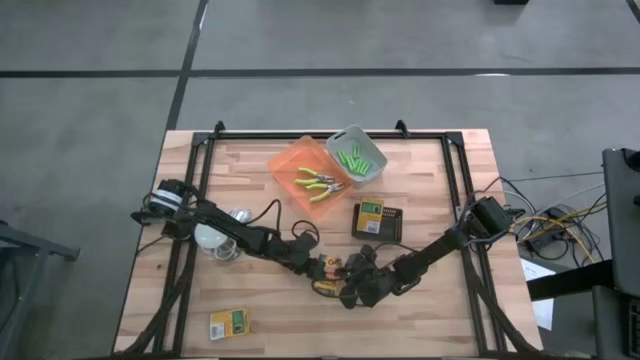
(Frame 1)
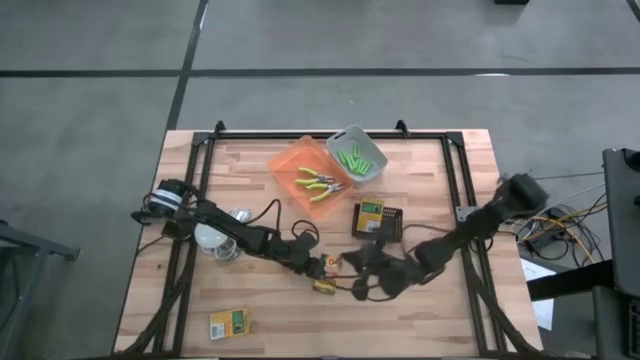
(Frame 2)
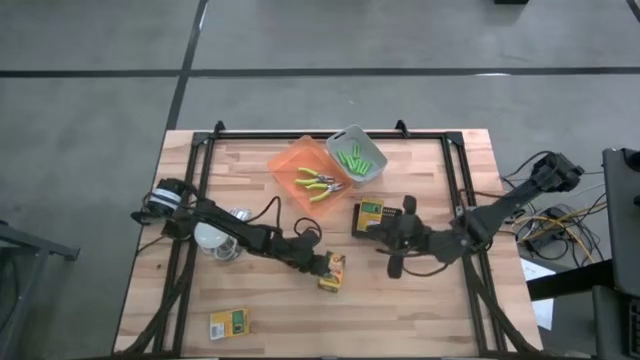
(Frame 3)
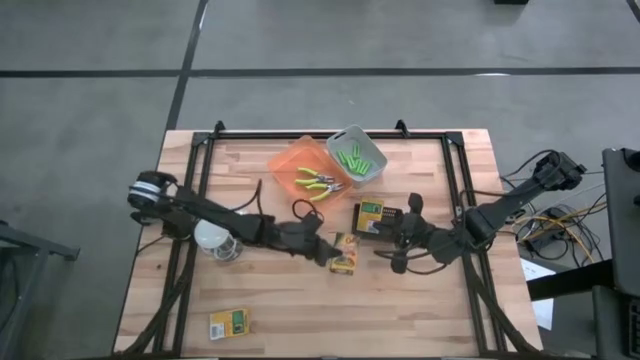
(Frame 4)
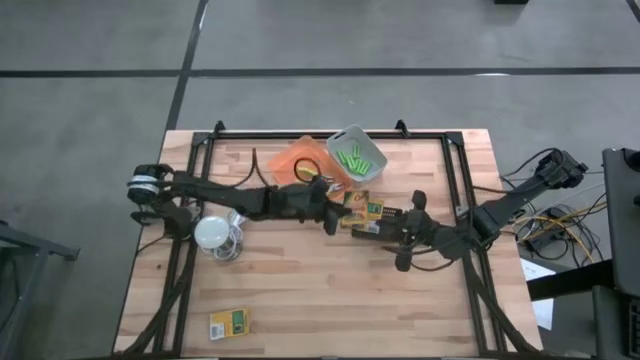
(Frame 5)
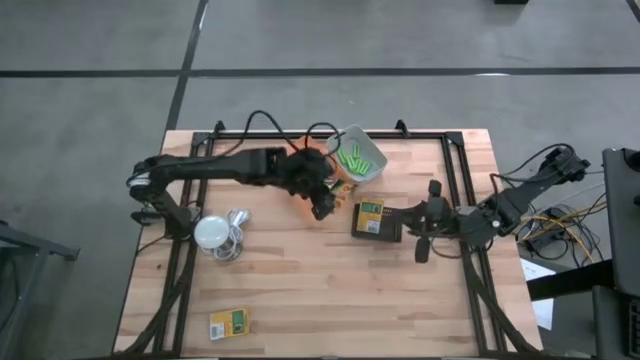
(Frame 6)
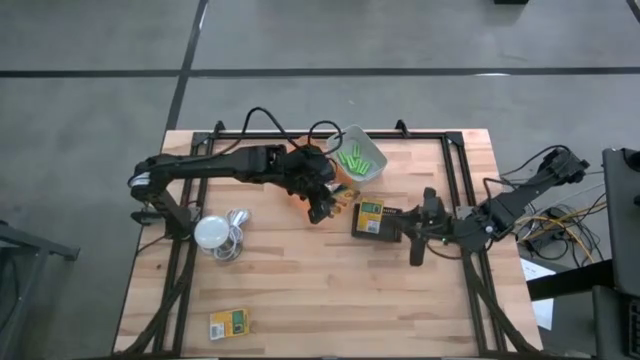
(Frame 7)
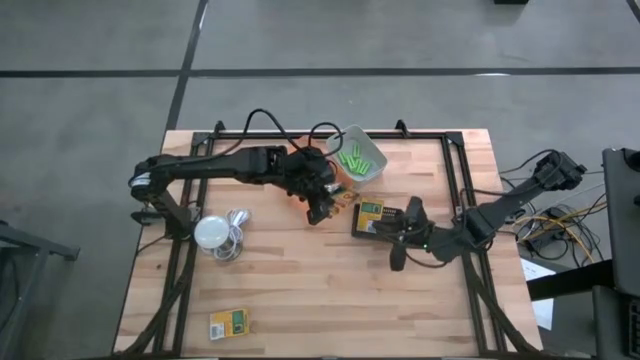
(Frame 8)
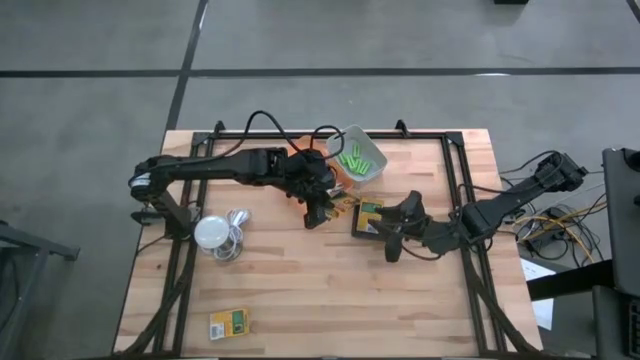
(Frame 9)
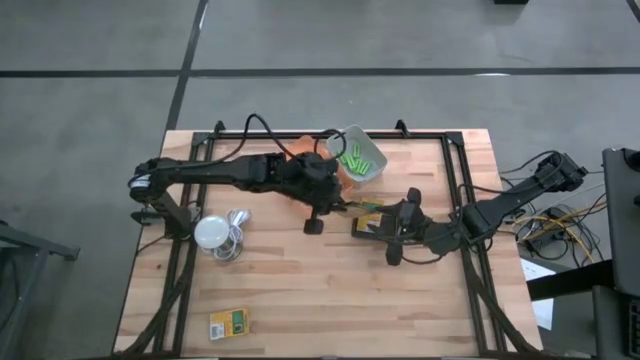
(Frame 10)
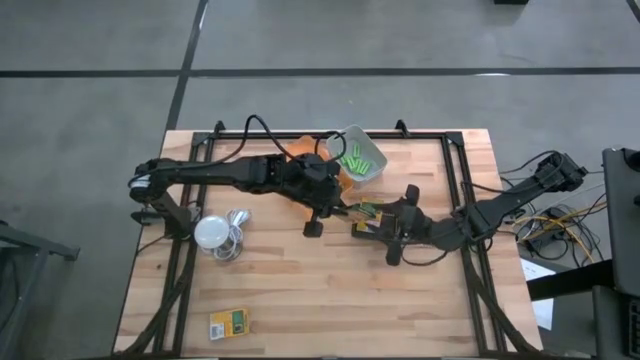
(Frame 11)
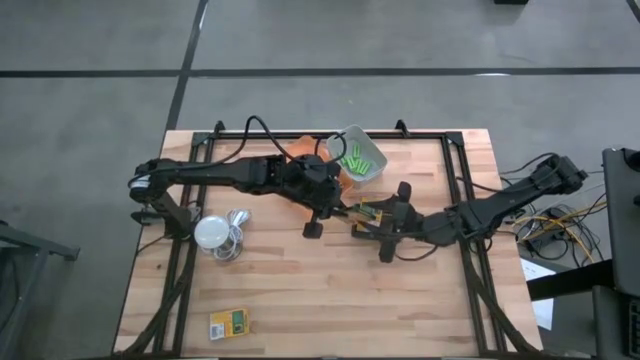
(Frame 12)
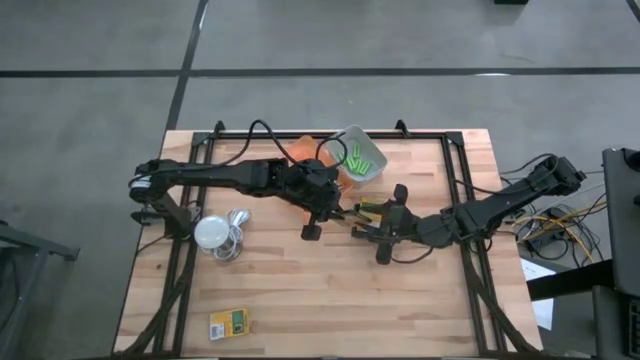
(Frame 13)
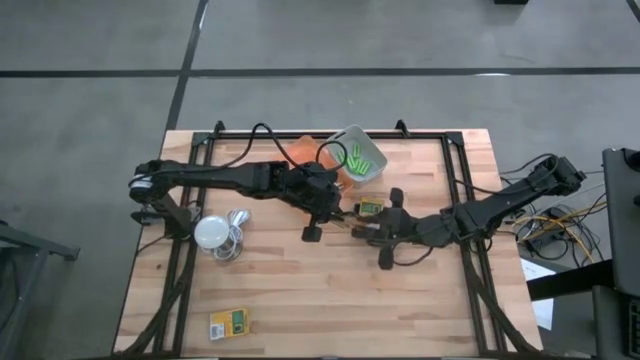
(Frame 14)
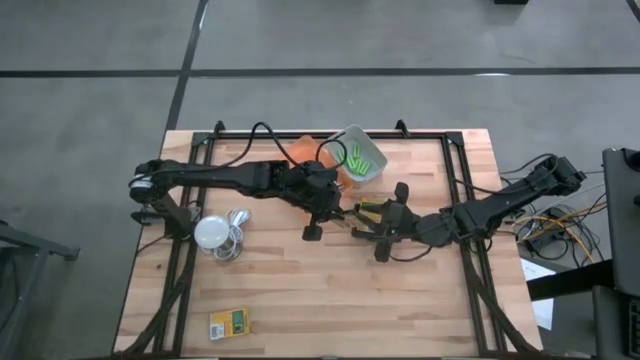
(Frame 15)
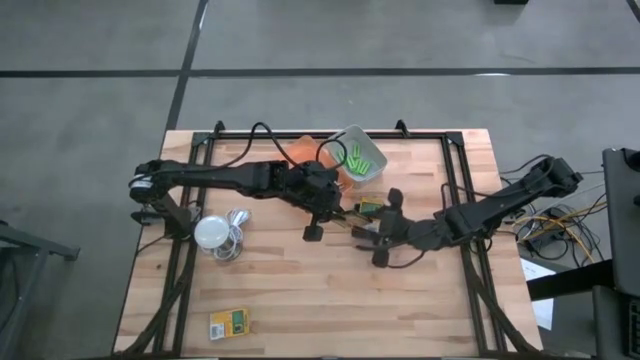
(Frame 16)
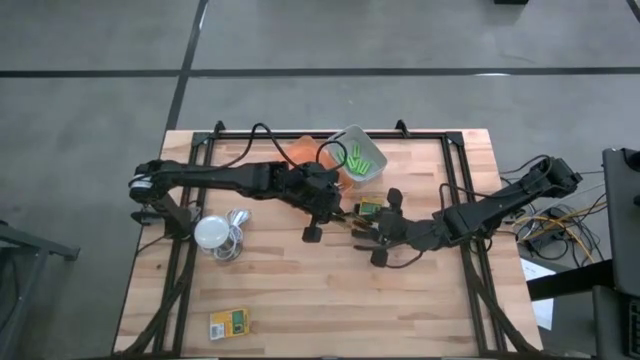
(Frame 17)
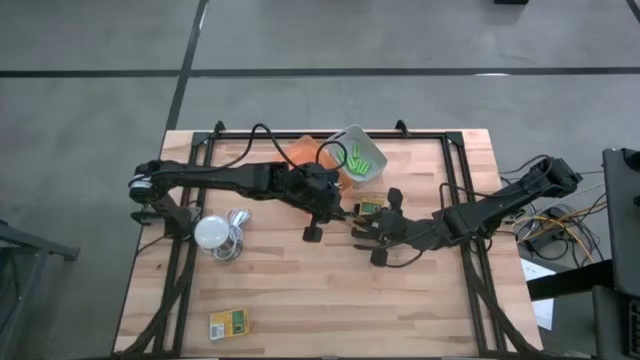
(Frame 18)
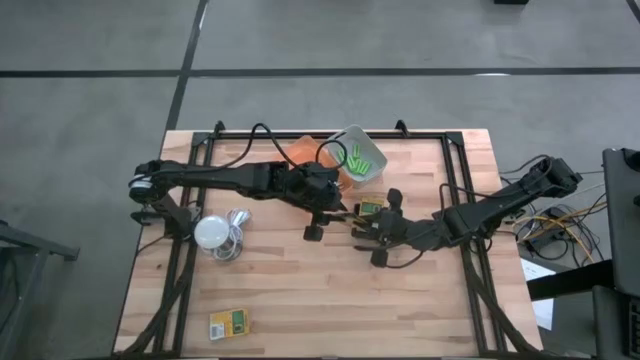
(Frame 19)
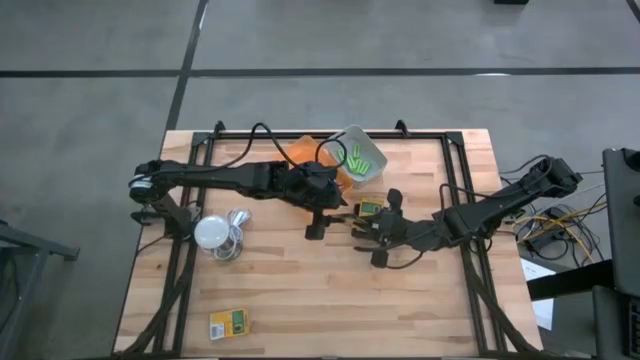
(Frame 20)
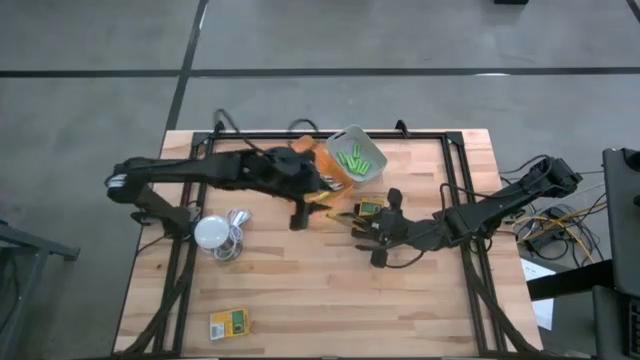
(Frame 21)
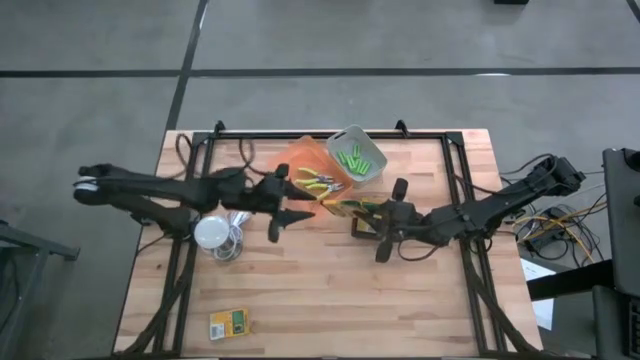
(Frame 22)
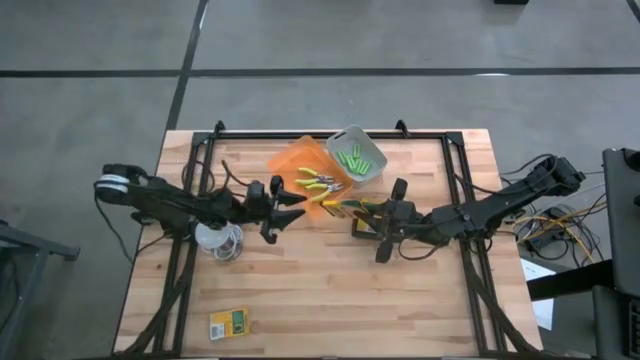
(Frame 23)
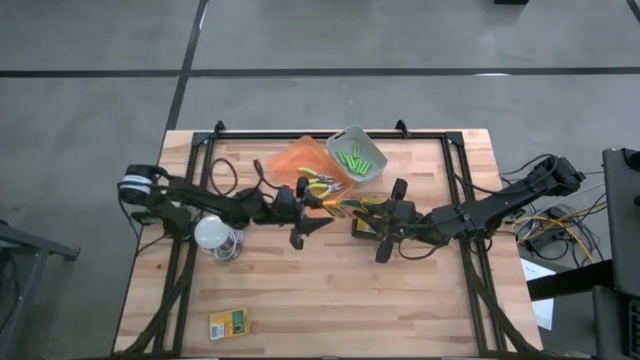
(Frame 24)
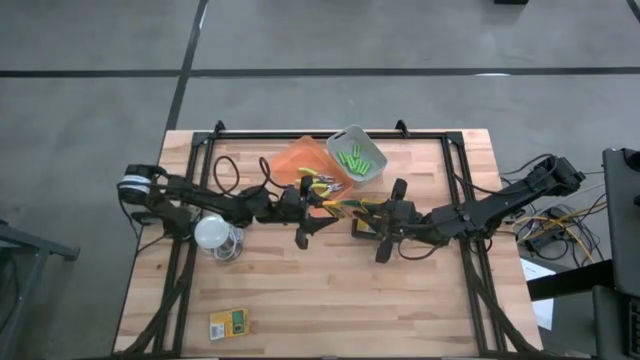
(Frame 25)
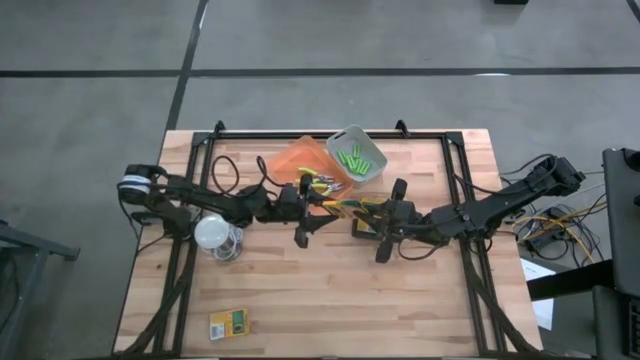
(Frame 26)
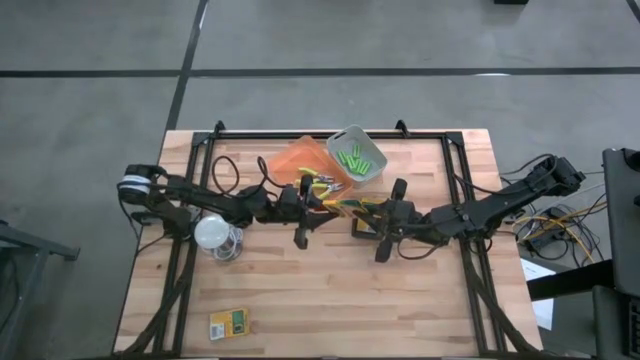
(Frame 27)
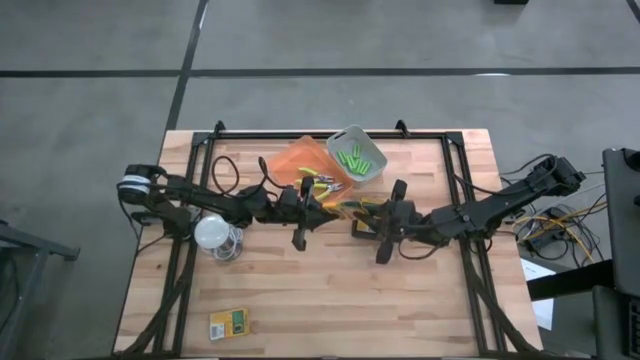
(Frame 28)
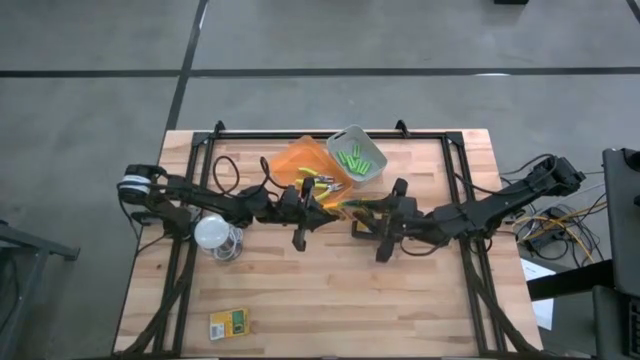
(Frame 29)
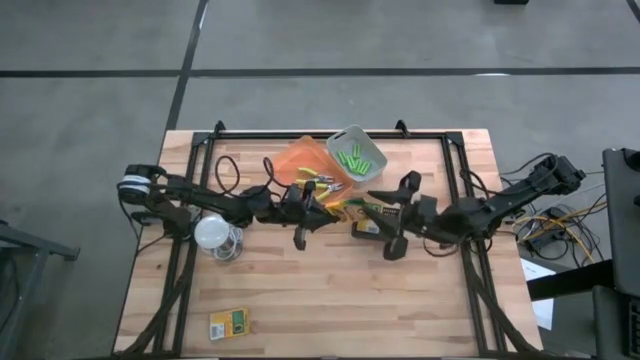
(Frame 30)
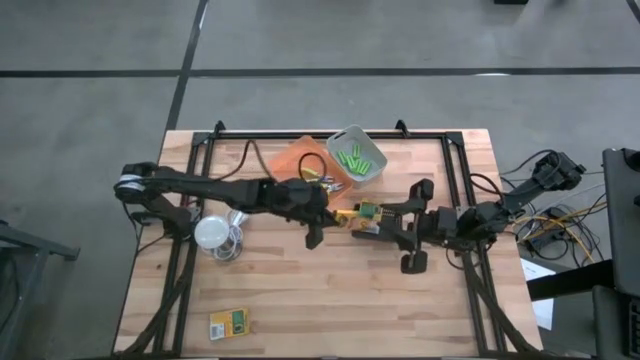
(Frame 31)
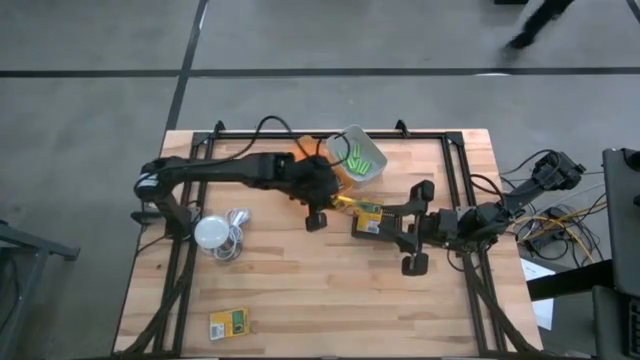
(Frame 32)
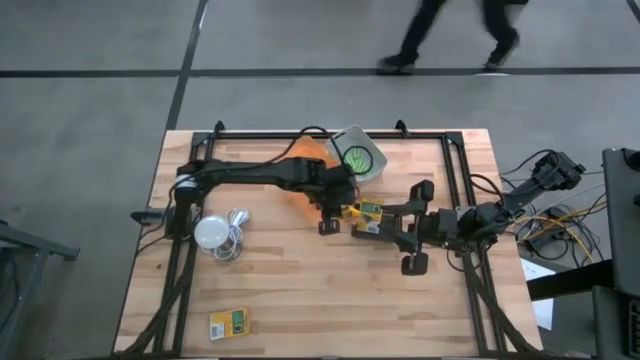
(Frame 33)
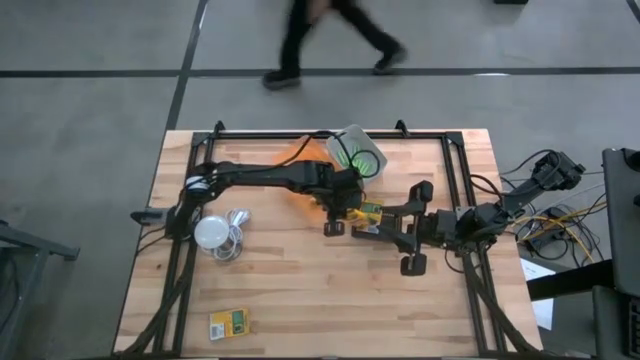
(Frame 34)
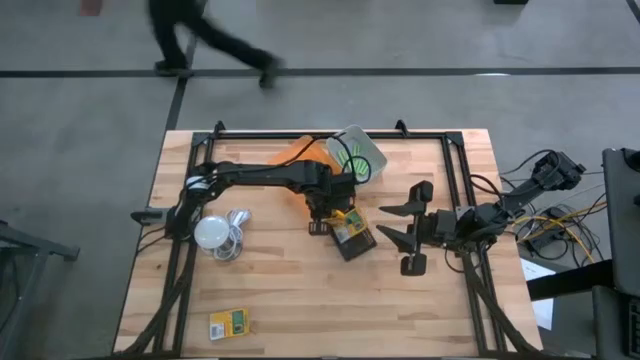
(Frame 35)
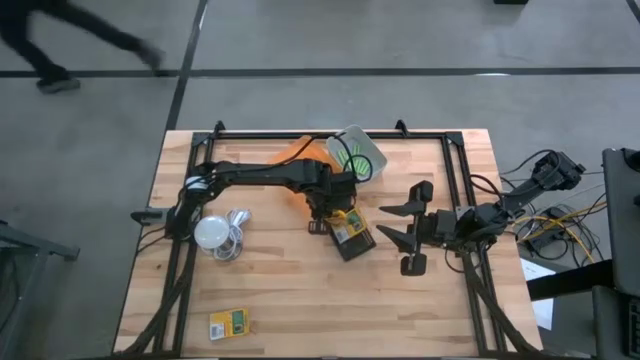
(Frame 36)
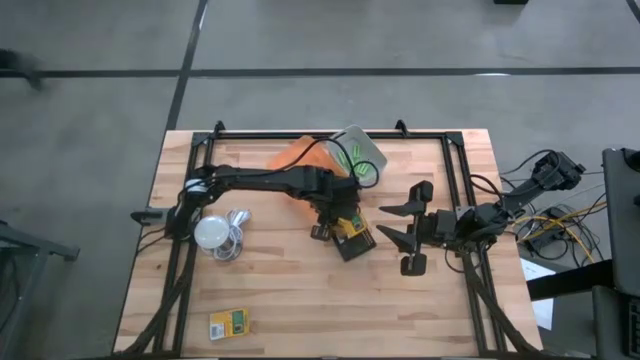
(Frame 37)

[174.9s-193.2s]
Task: Pick & Place School Supplies
Put the yellow crayon box into the black bin

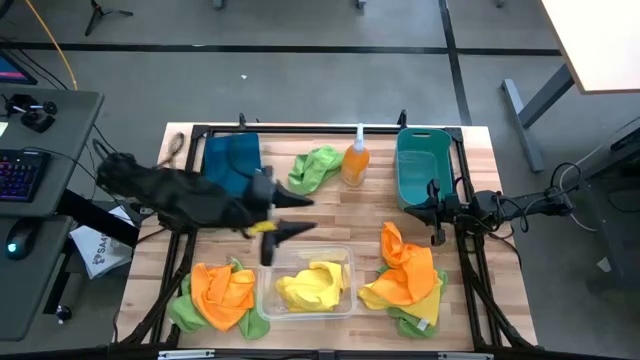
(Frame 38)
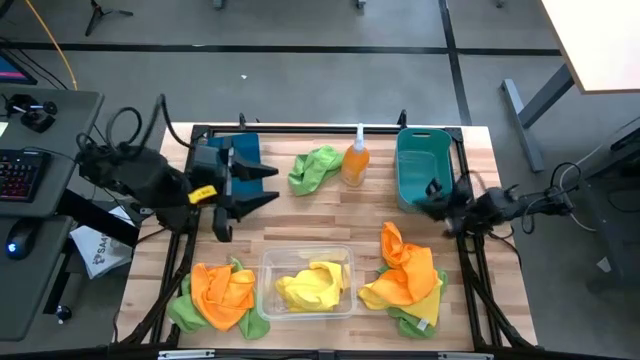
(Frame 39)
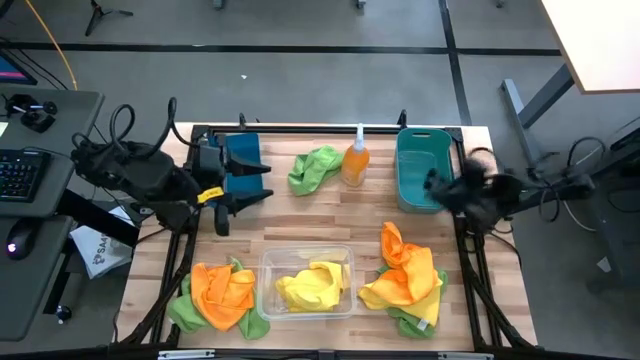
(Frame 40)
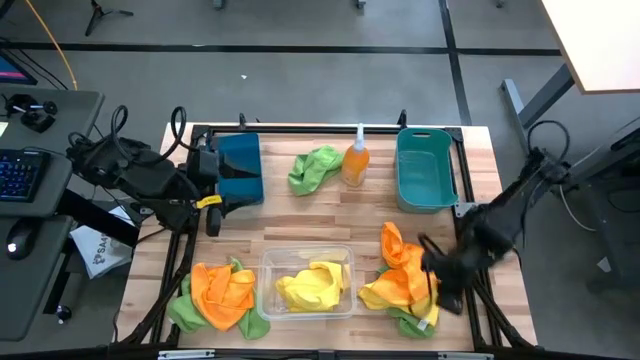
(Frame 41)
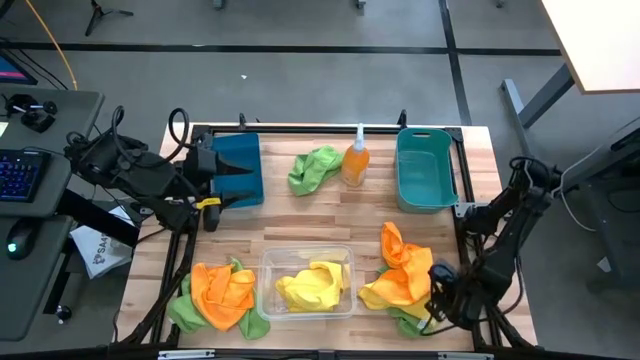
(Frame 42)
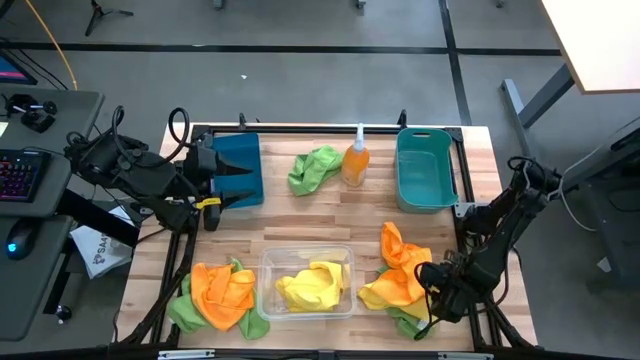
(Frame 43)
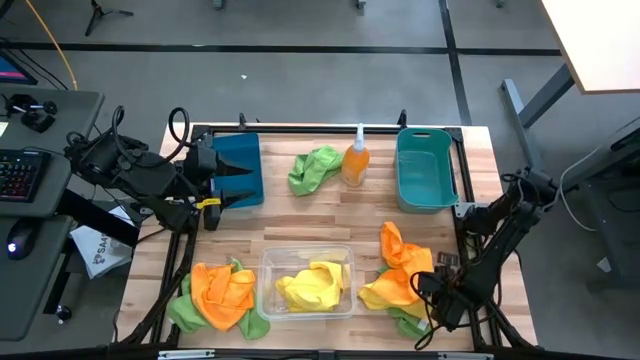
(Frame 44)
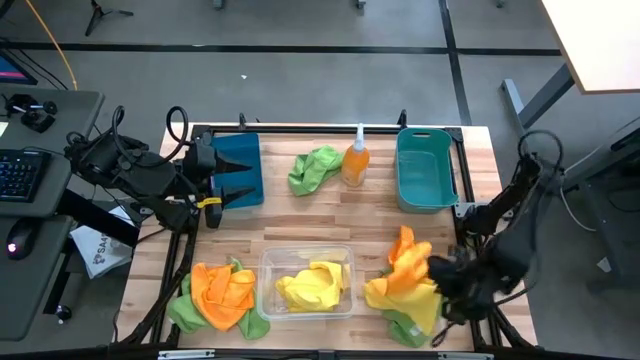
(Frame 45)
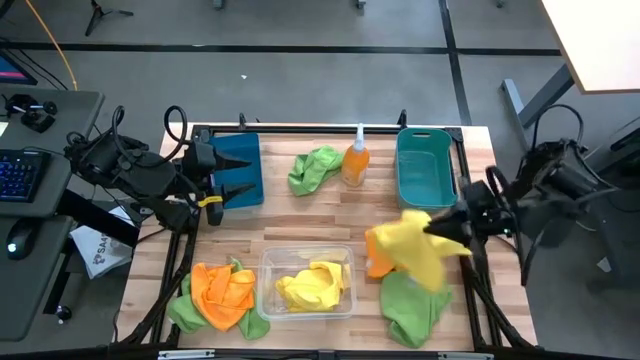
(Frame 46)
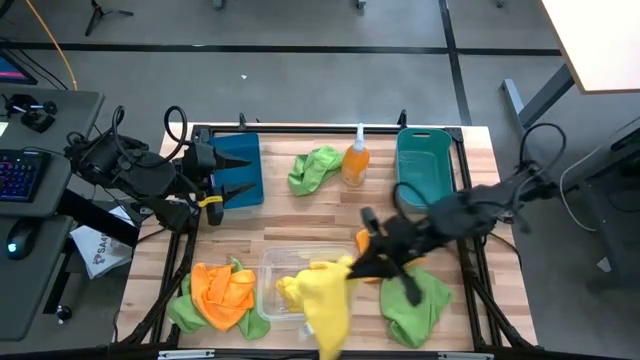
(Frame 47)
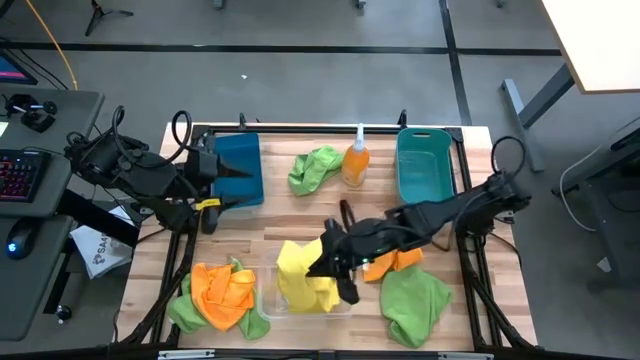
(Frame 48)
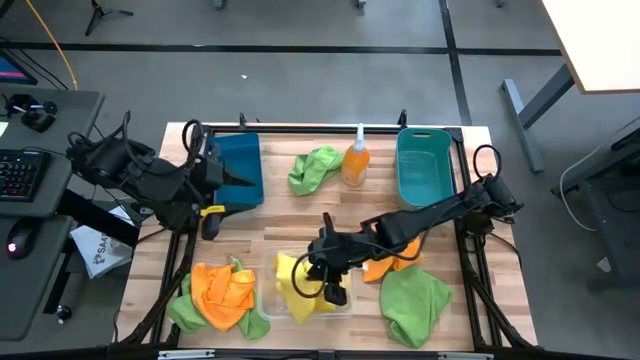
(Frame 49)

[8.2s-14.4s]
Task: Sort microfiber towel by color & place in baskets
Put the yellow microfiber cloth into the transparent bin
